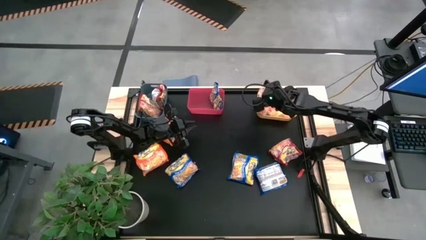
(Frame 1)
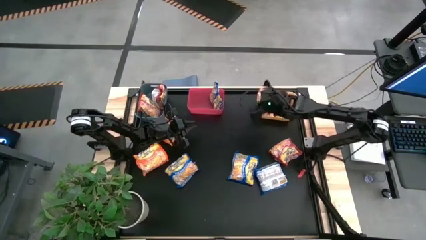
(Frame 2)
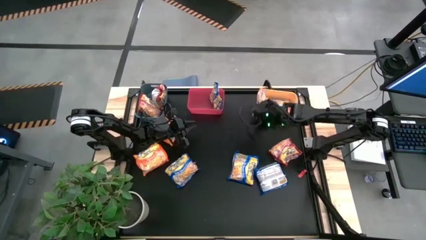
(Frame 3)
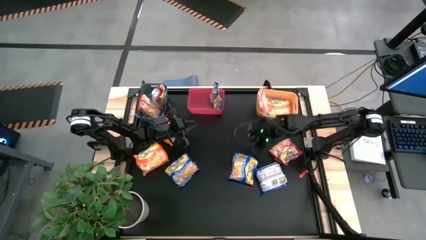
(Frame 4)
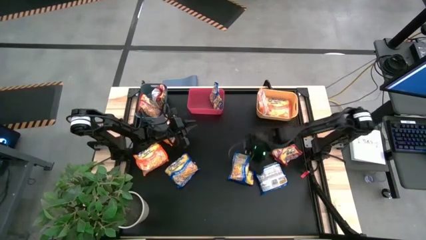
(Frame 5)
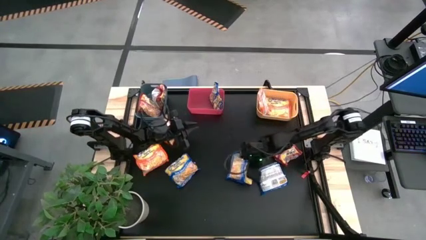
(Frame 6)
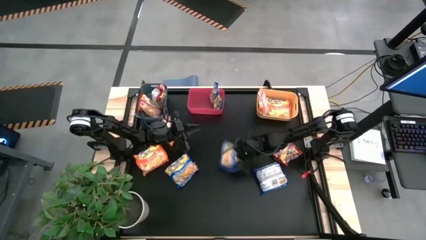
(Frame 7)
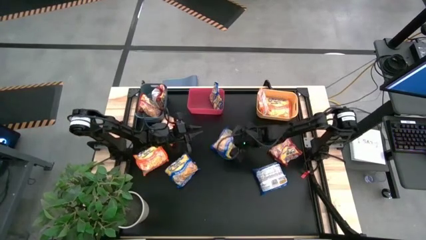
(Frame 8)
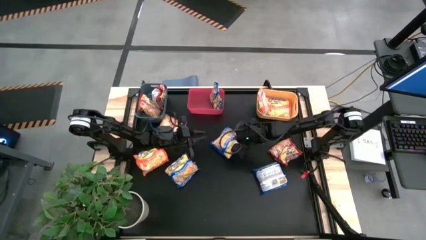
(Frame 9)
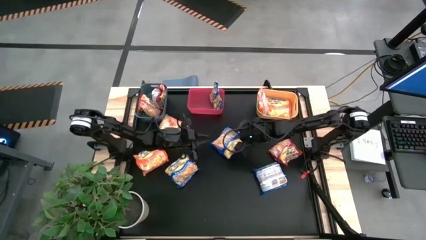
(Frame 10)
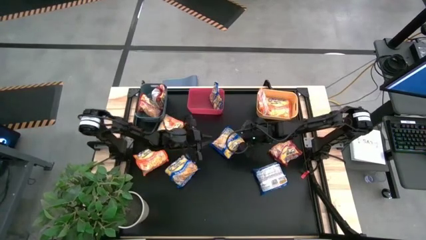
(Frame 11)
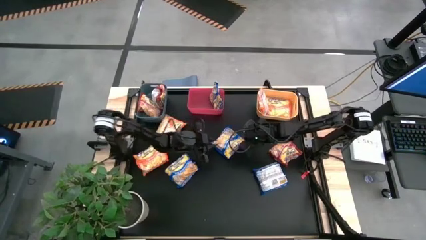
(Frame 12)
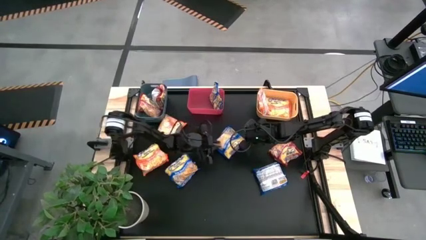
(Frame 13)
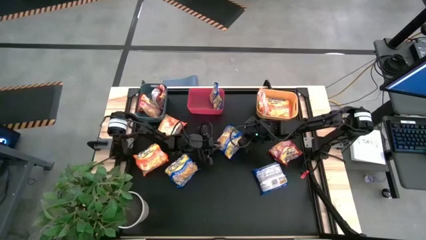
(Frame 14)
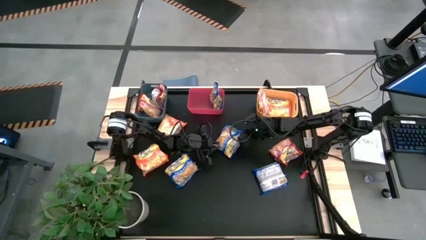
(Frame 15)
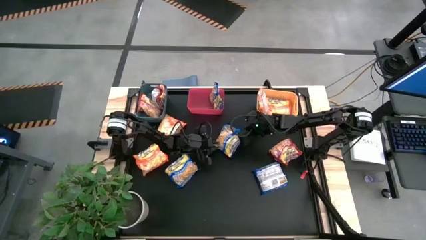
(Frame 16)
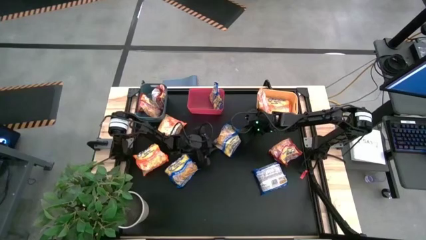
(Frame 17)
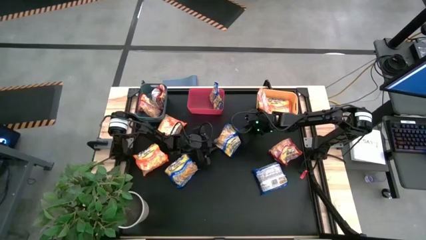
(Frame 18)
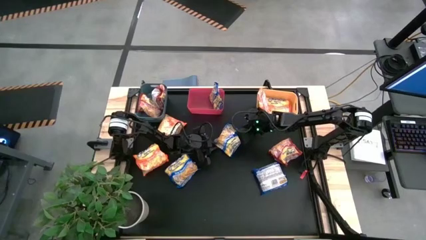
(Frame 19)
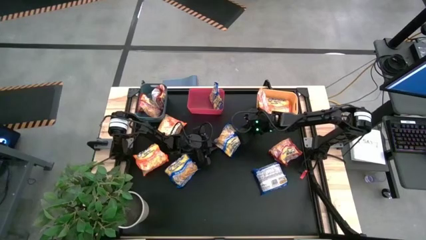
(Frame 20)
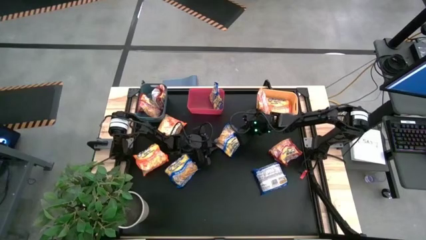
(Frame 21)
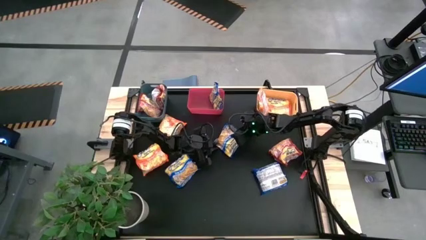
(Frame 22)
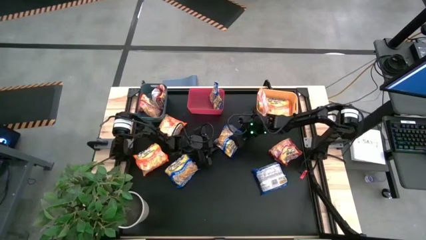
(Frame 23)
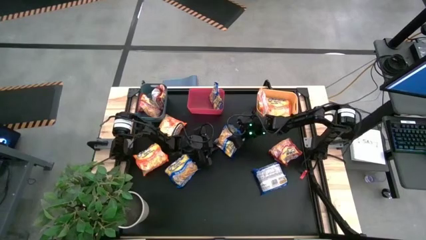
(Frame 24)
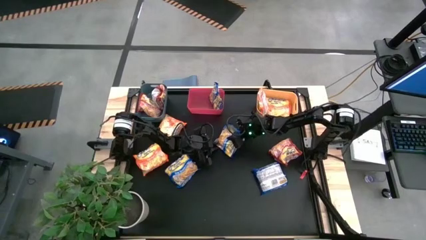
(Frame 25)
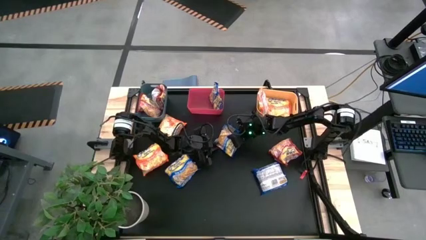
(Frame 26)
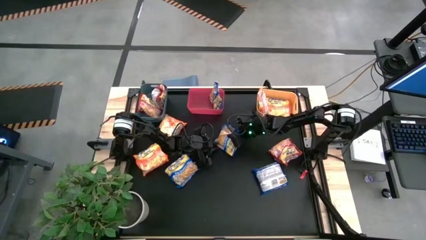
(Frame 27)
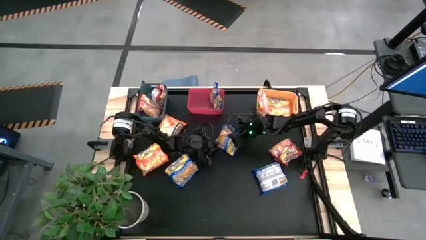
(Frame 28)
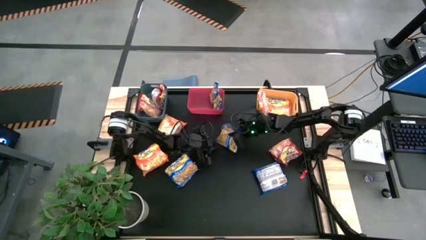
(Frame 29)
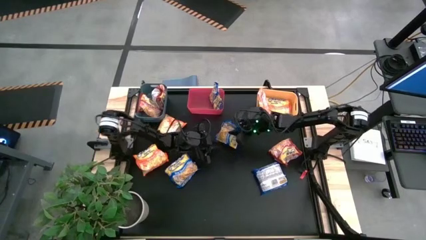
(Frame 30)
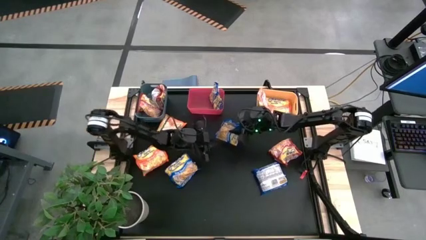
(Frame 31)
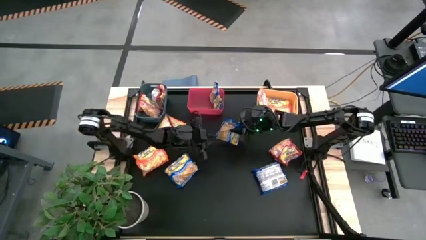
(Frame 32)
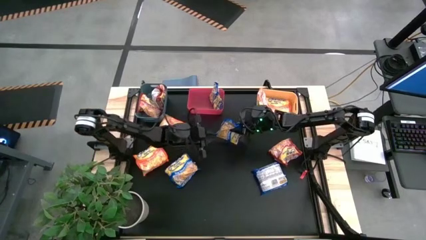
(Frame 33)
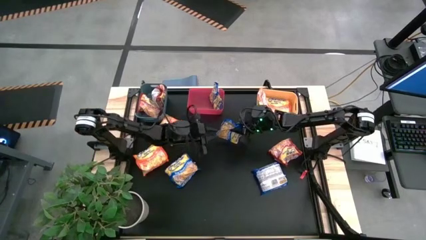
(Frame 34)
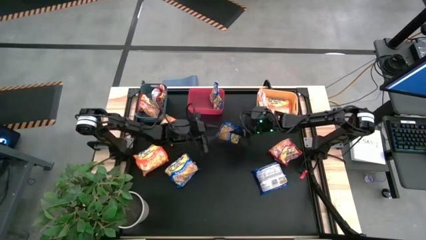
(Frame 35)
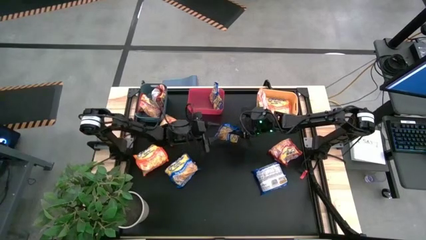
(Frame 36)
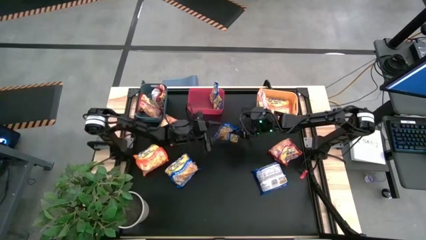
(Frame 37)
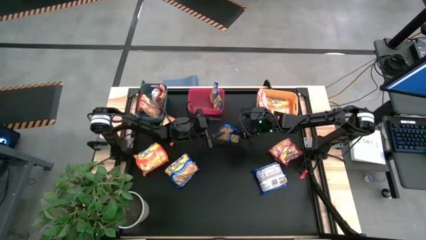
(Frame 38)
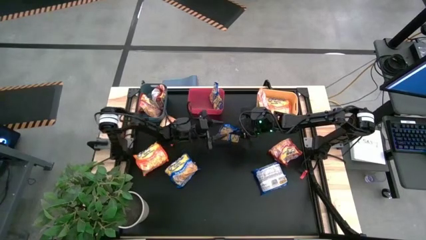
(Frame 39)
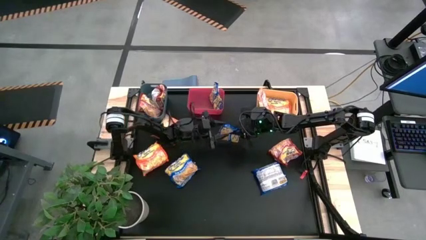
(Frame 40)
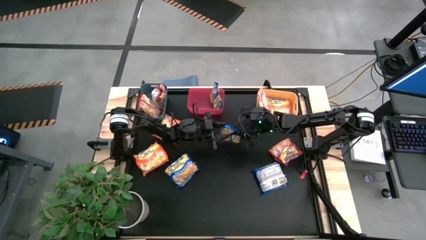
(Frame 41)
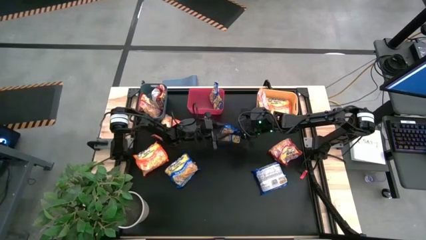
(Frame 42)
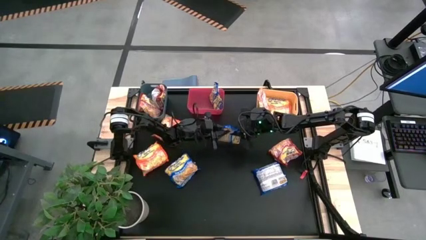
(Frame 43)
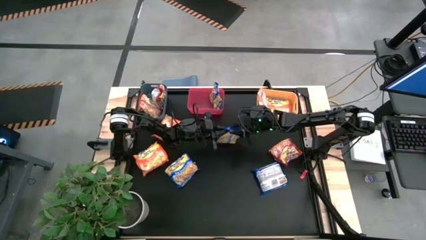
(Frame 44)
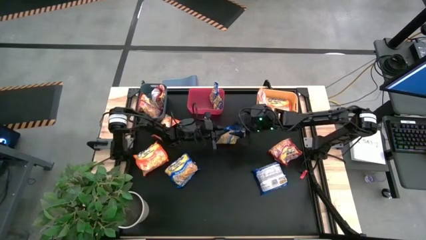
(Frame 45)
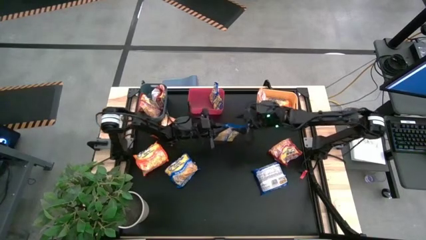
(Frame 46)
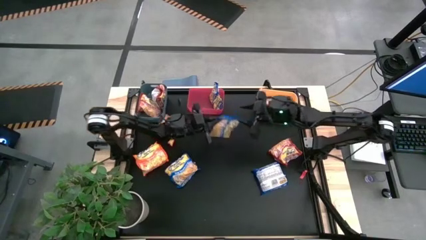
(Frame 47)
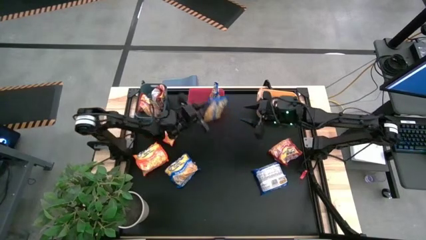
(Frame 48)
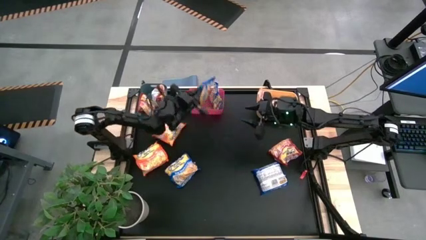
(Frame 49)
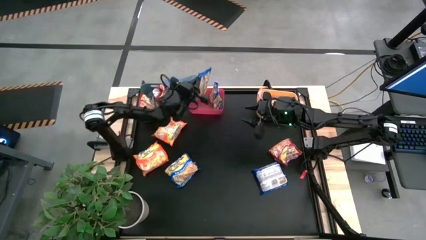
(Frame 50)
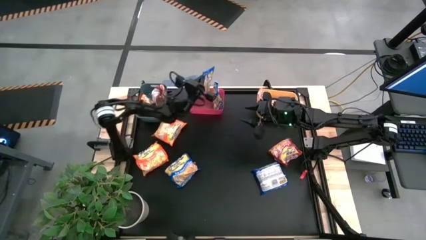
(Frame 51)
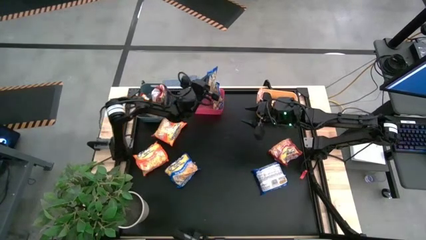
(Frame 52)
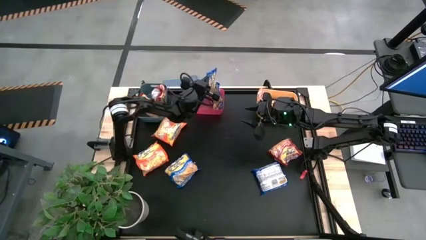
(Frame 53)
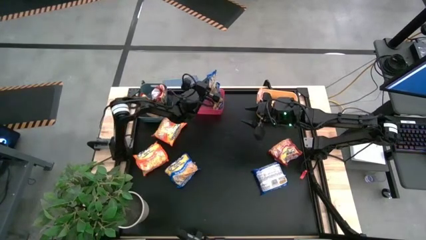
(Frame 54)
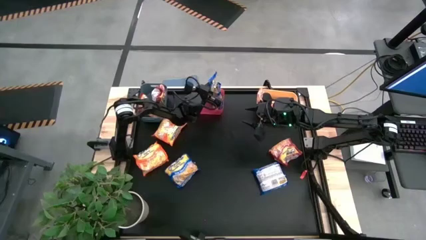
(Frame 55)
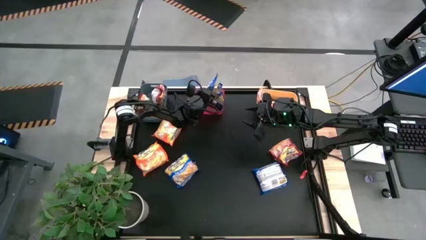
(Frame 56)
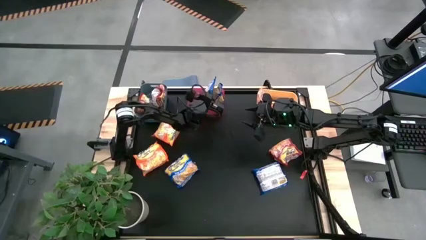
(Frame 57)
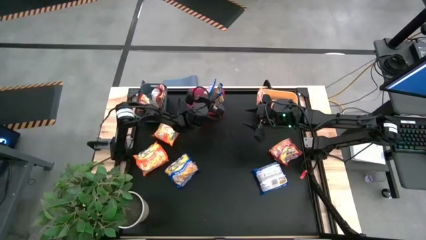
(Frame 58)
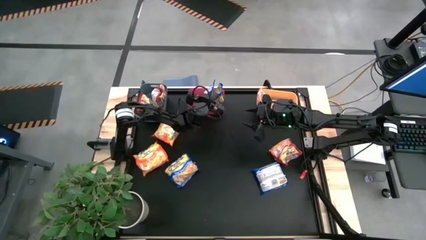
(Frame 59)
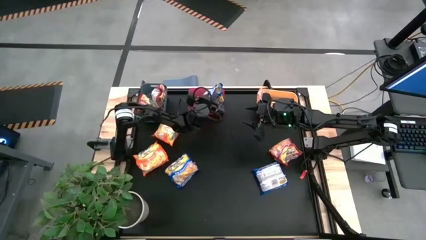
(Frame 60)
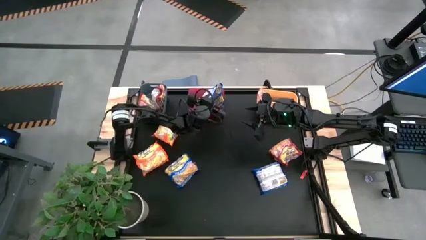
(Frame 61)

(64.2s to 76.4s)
Task: Sort Maruchan noodles
Put the blue noodle pack into the pink bin
